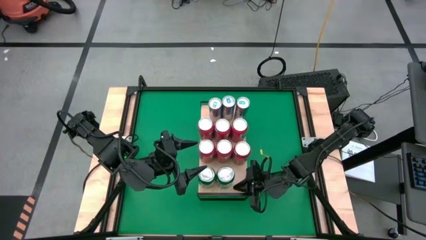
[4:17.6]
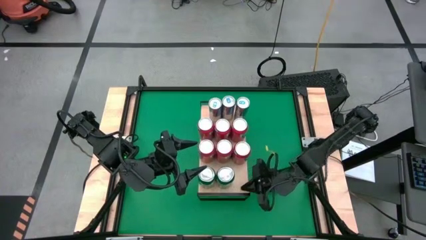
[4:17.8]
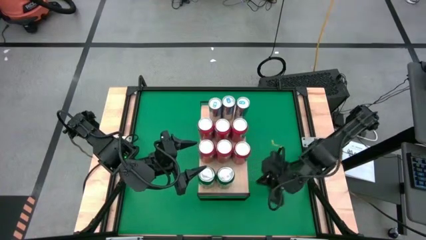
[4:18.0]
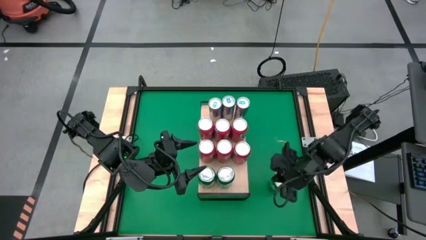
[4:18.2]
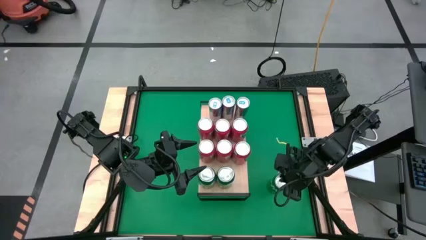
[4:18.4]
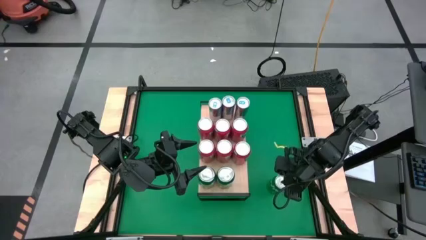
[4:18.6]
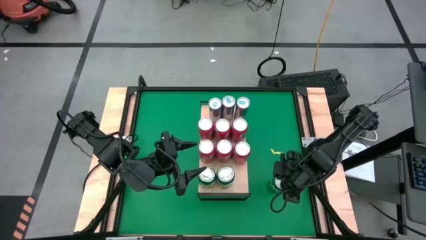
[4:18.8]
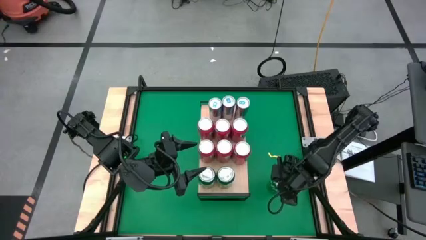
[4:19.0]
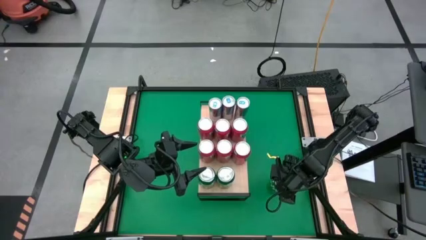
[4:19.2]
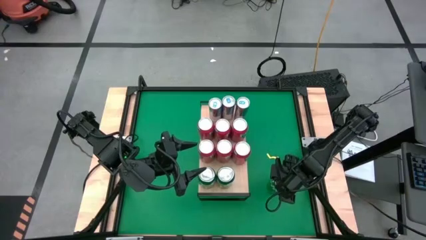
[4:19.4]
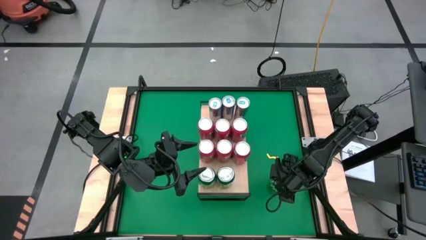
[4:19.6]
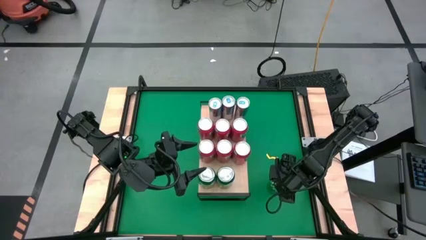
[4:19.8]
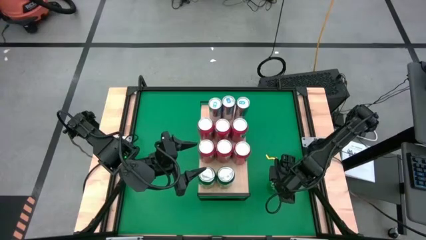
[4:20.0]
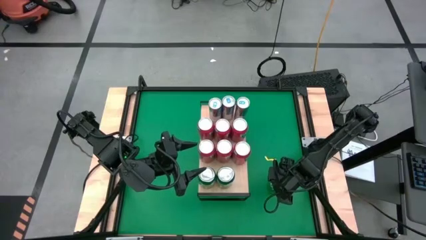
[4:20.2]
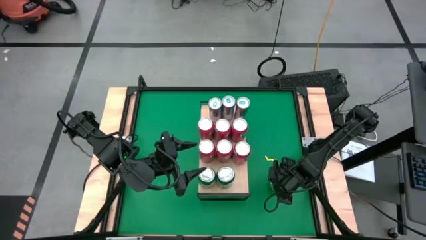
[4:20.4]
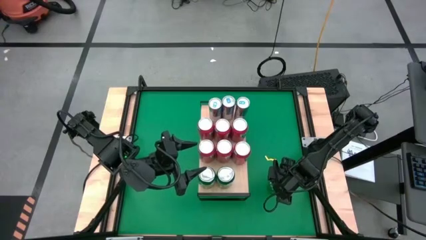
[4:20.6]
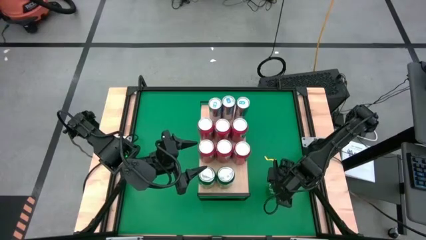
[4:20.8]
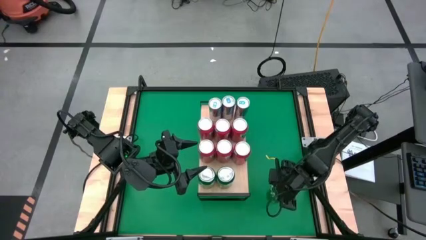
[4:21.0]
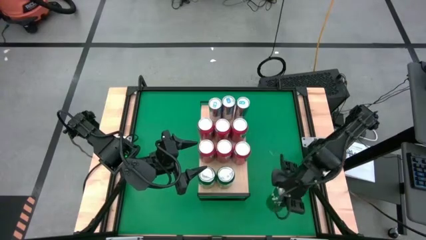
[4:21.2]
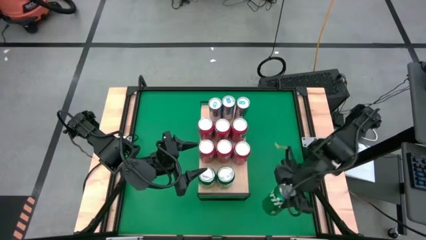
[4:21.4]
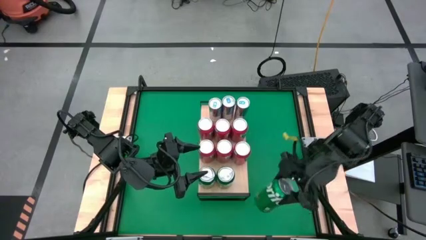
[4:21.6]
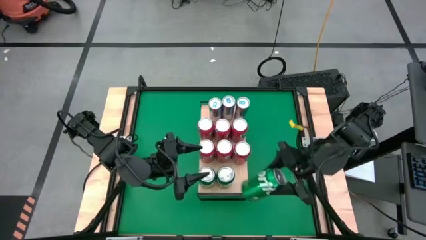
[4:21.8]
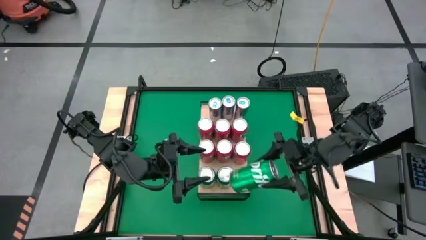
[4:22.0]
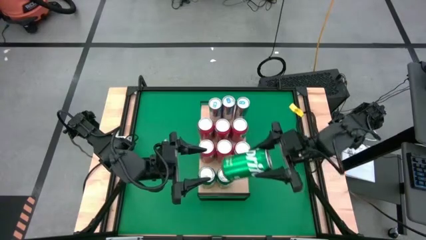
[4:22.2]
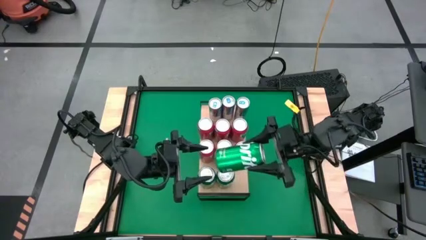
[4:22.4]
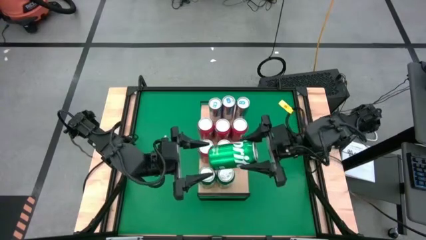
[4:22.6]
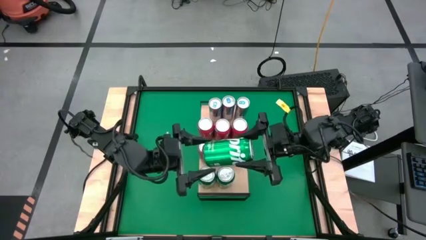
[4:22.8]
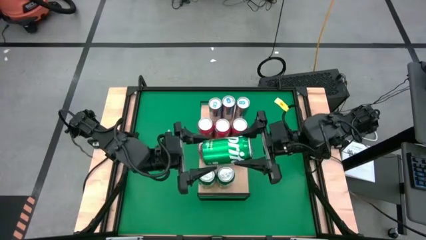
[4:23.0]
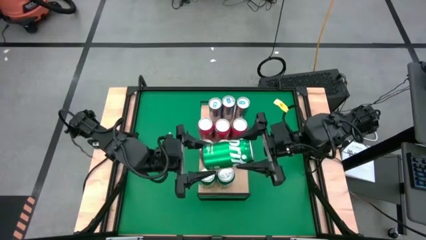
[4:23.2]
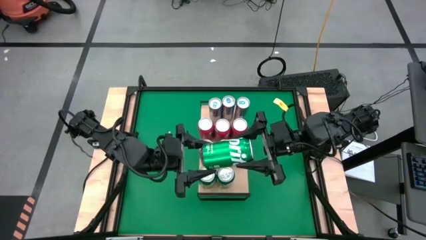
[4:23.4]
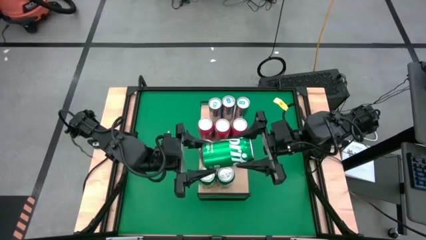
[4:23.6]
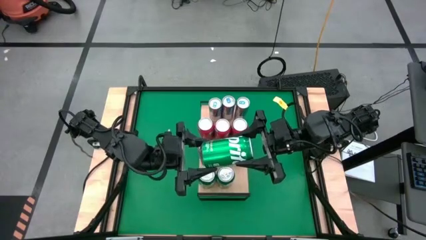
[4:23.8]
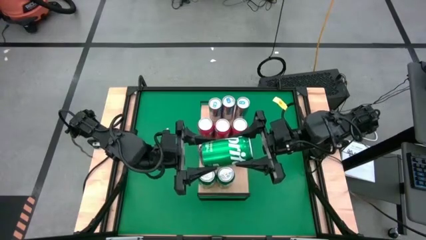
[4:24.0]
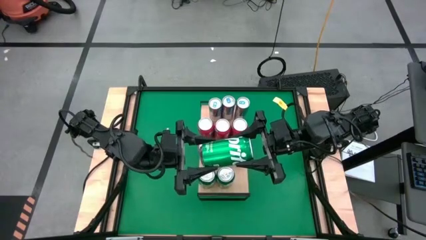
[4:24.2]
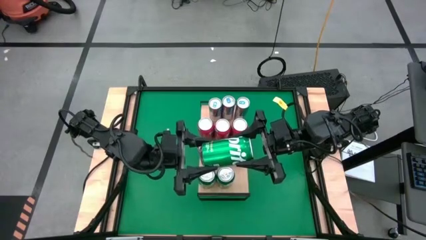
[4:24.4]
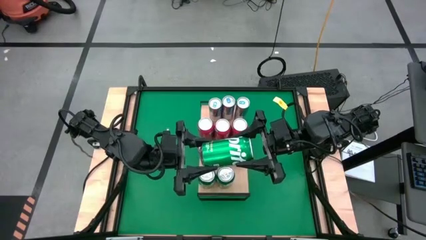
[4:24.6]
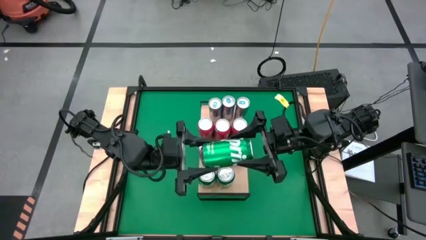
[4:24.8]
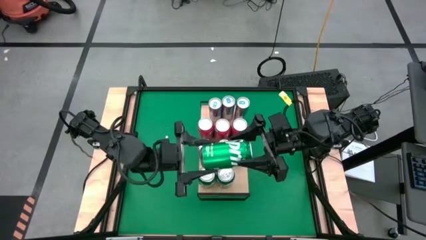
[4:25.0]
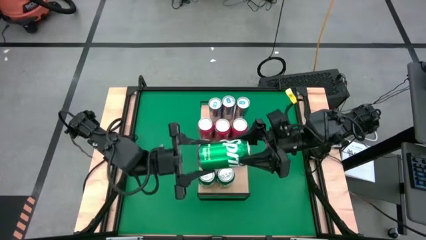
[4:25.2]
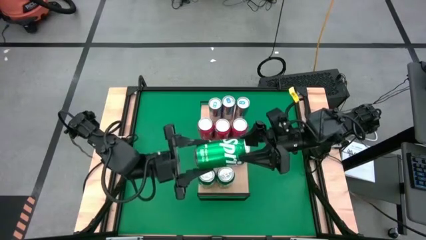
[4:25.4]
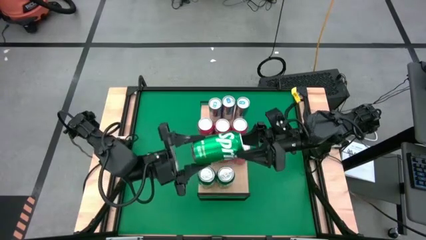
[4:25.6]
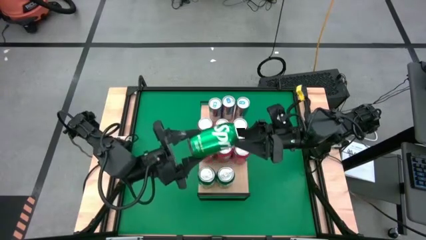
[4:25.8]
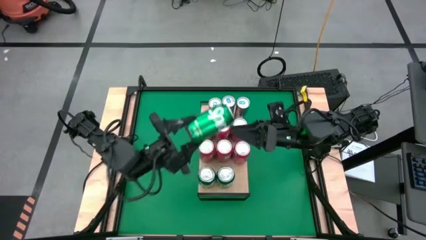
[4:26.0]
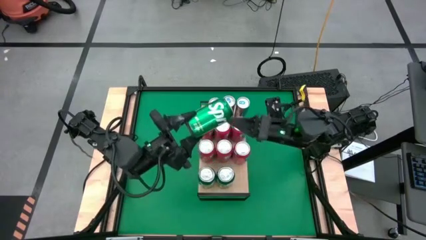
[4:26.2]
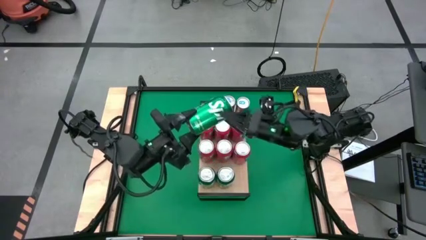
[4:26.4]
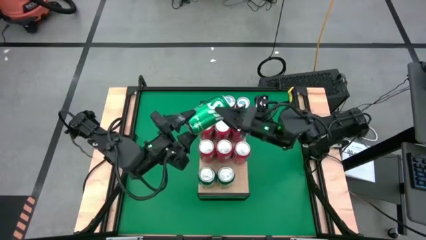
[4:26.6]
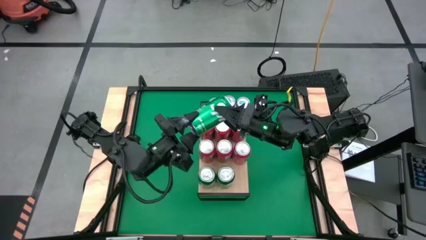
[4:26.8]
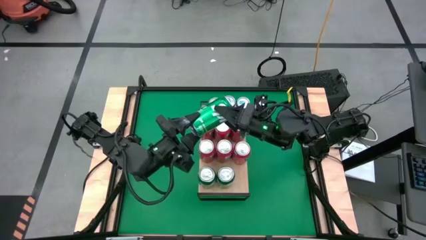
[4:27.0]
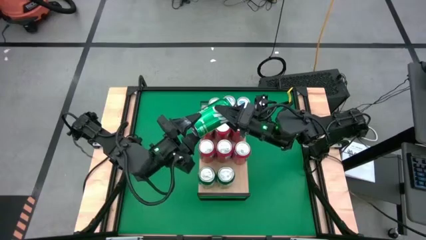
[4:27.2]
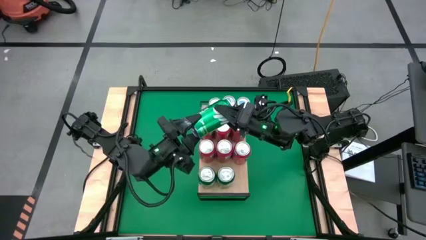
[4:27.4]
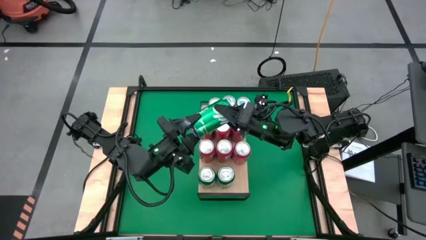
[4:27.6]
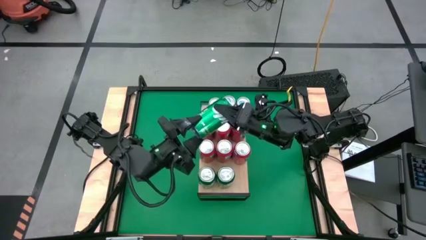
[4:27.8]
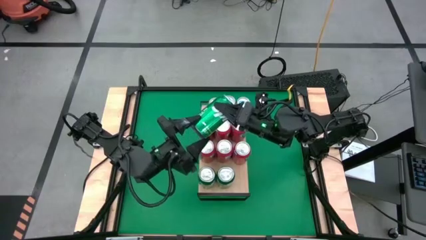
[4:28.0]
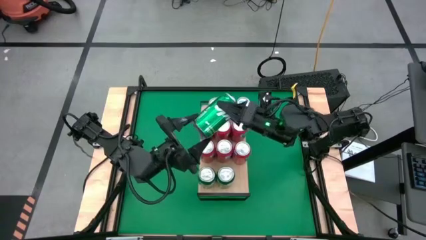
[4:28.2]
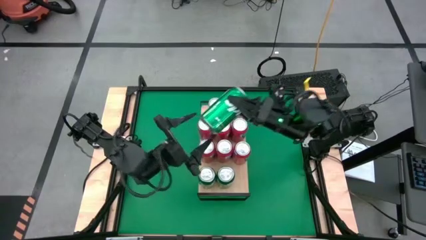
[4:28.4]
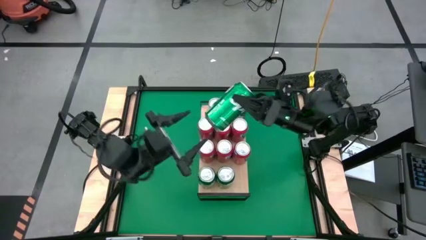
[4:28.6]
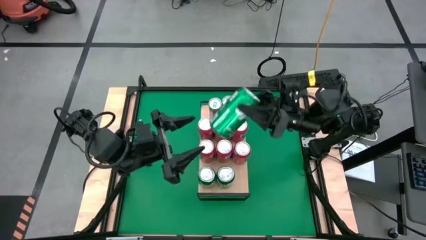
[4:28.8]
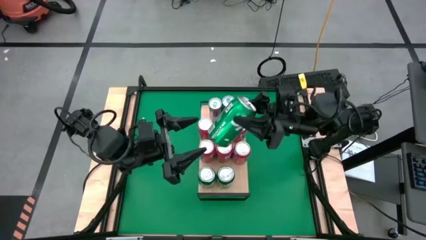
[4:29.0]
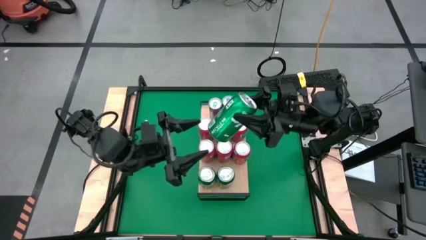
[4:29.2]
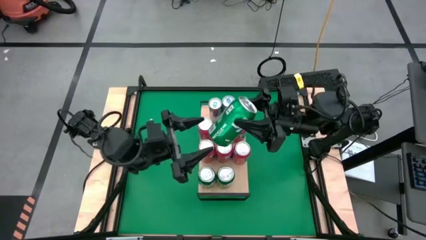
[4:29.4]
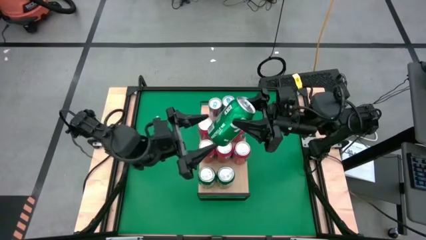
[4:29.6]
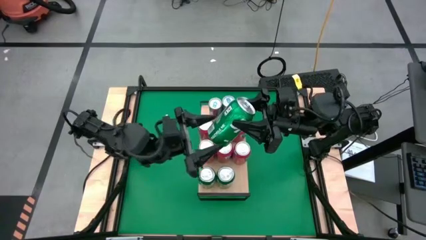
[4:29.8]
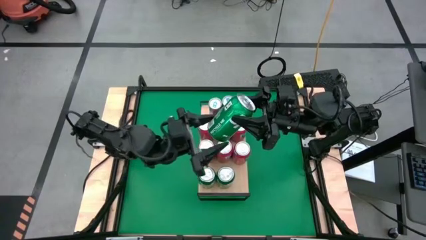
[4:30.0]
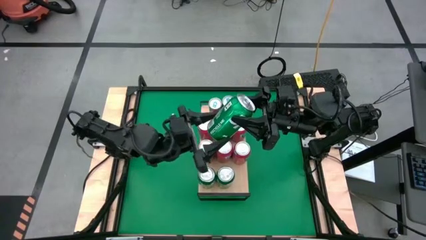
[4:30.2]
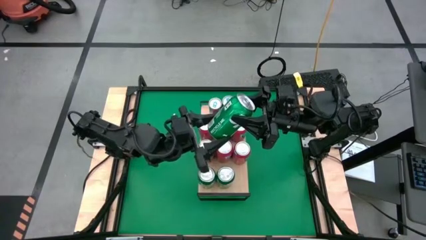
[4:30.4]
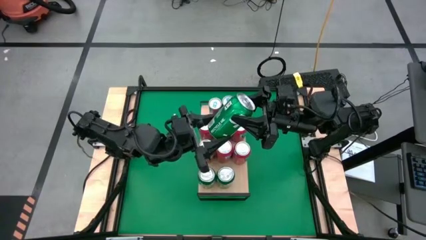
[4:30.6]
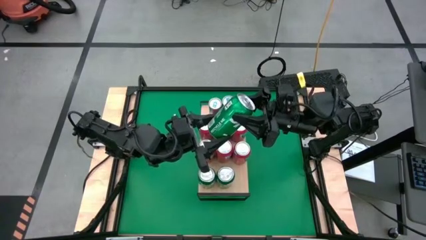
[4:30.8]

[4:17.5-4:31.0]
Task: Place canned beverage on shelf
Put the green soda can on the shelf aligned with the other green soda cans

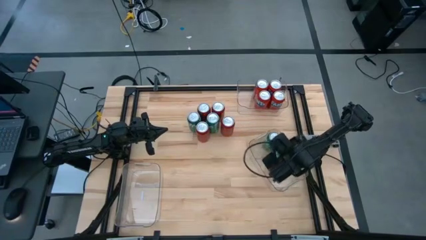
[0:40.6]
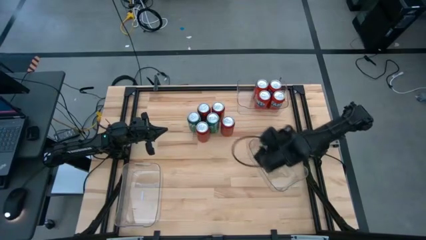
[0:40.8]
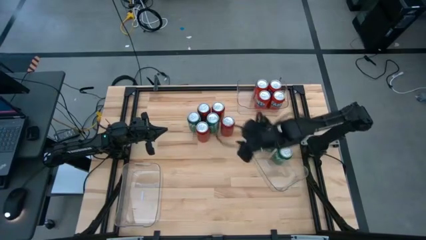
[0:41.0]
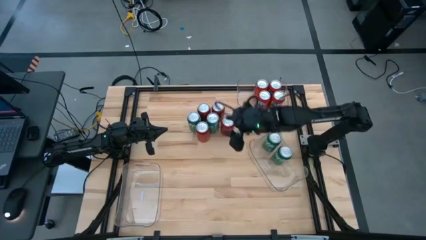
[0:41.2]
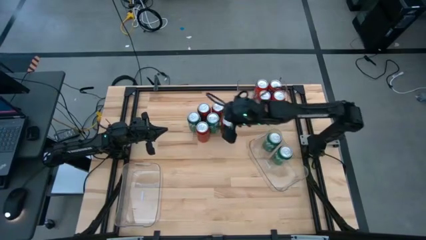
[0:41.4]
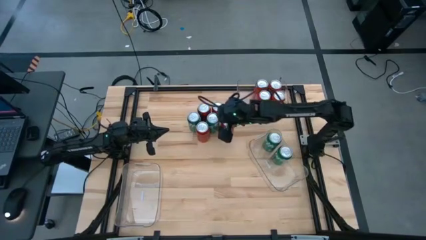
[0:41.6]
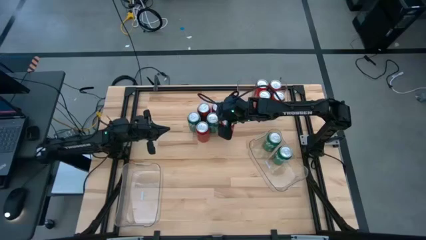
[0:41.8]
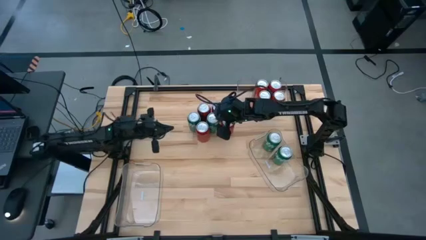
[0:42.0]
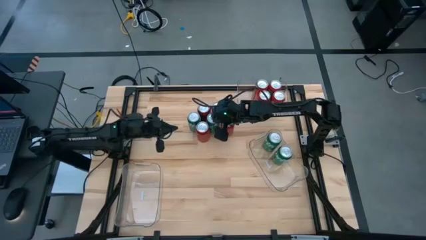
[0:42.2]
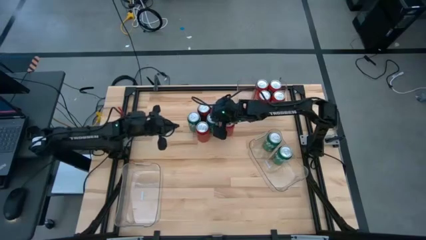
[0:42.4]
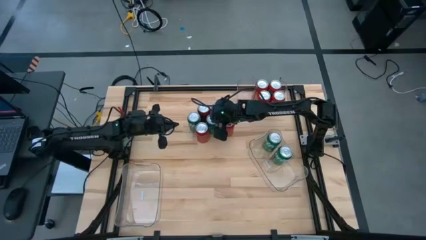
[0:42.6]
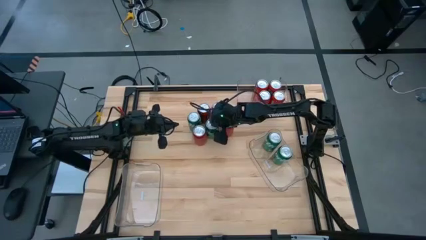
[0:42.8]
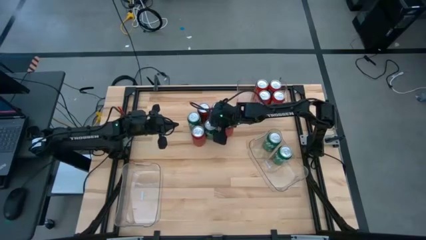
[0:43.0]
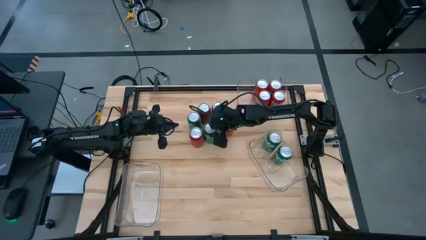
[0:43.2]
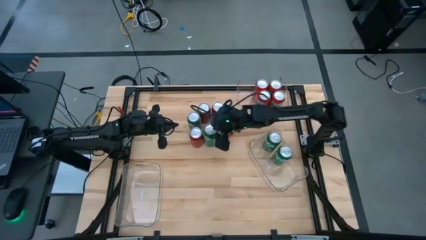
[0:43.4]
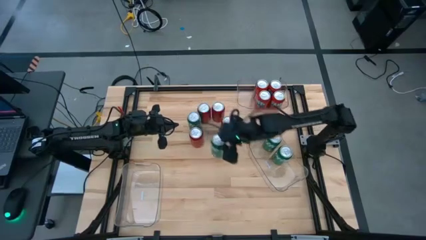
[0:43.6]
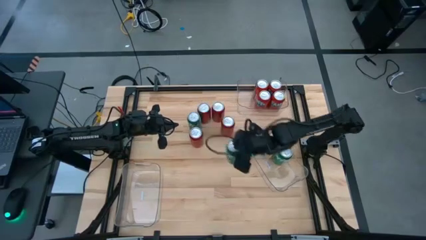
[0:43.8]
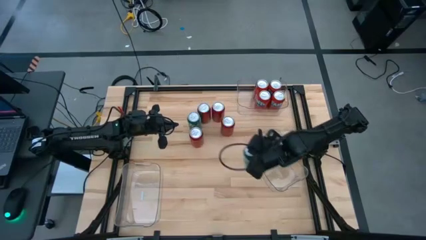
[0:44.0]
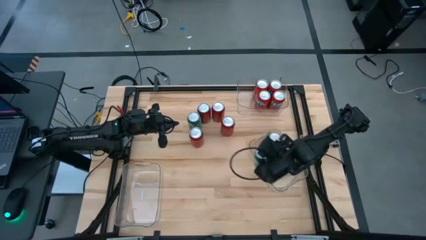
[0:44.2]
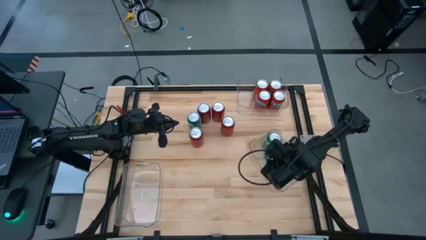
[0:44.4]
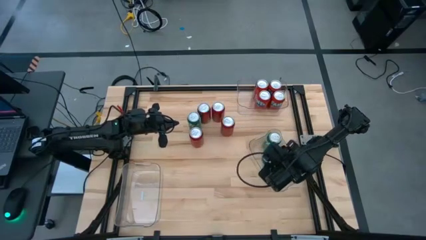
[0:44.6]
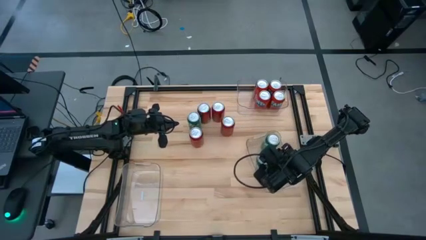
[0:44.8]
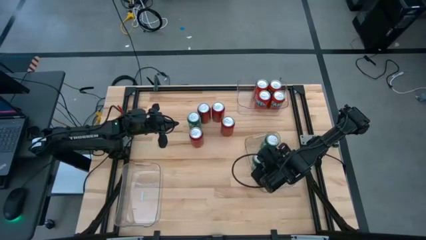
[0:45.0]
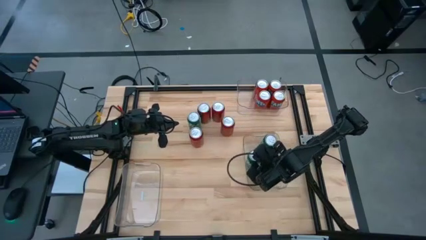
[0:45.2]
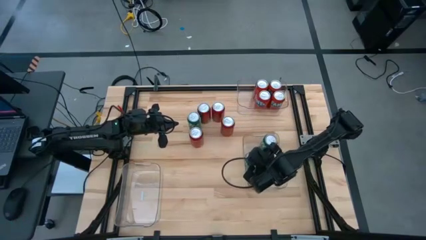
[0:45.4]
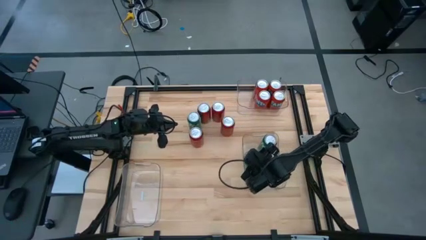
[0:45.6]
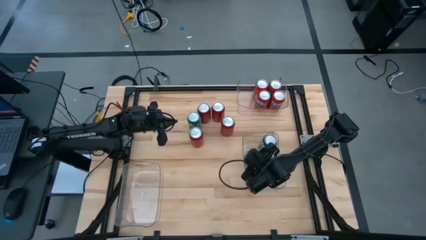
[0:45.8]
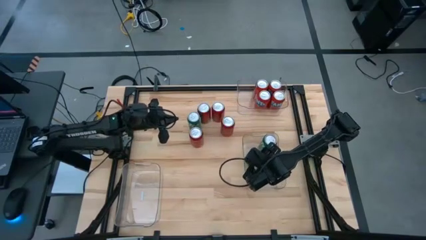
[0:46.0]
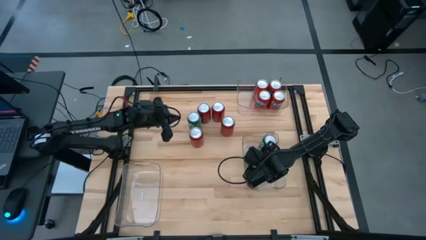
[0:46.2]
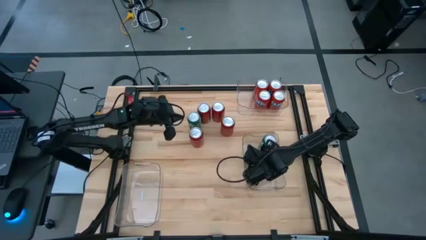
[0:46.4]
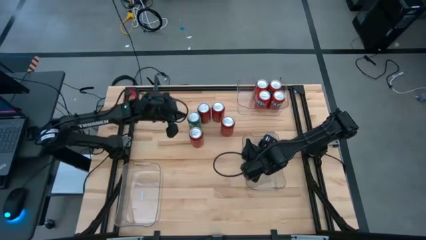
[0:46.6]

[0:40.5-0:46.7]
Task: Sort soda cans
Put the right green soda can into the bottom right transparent bin
